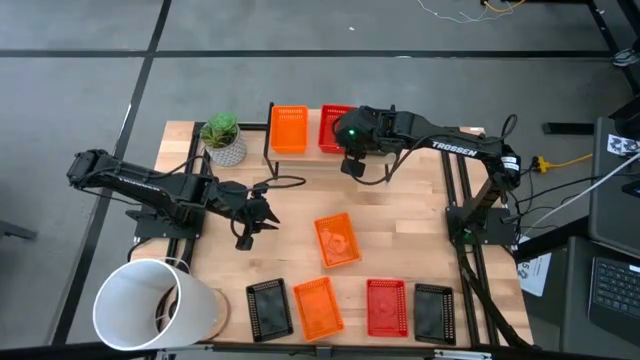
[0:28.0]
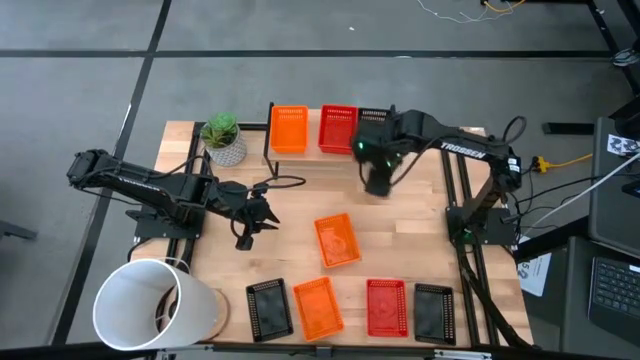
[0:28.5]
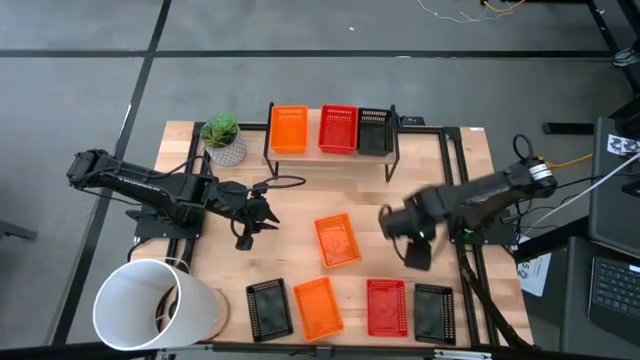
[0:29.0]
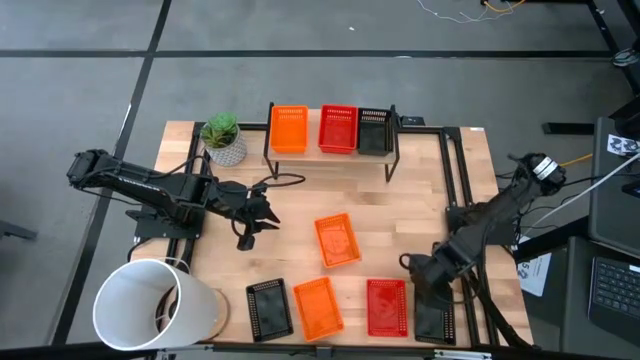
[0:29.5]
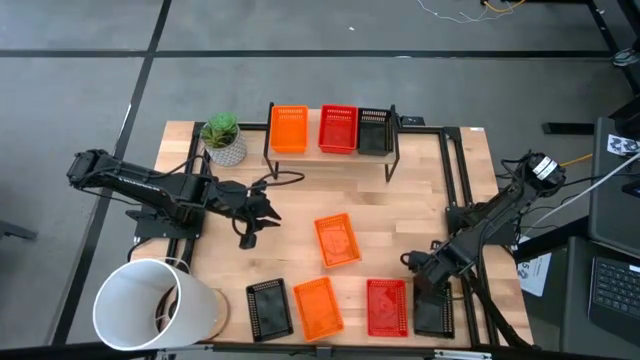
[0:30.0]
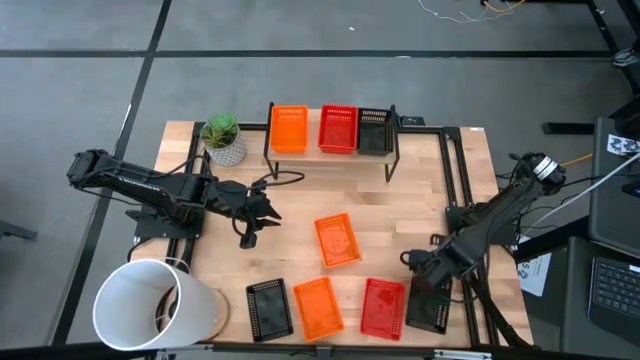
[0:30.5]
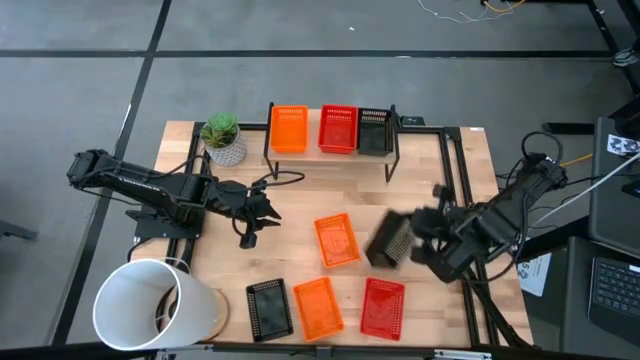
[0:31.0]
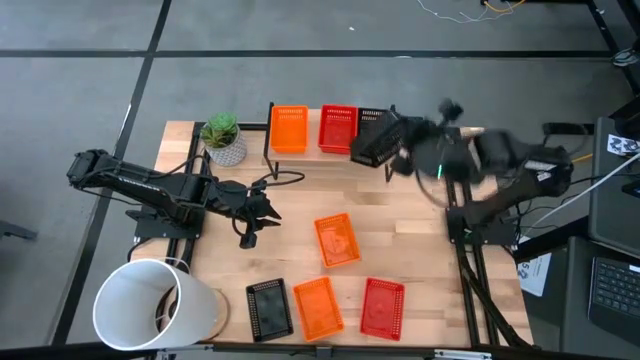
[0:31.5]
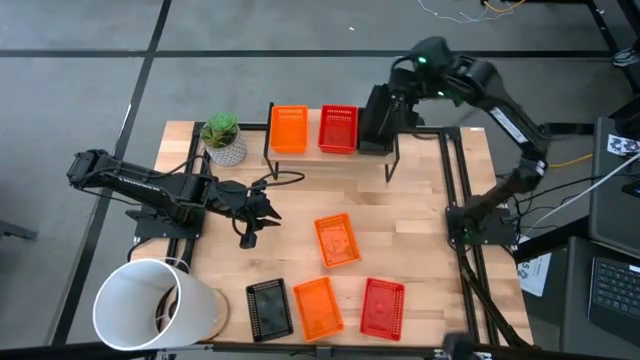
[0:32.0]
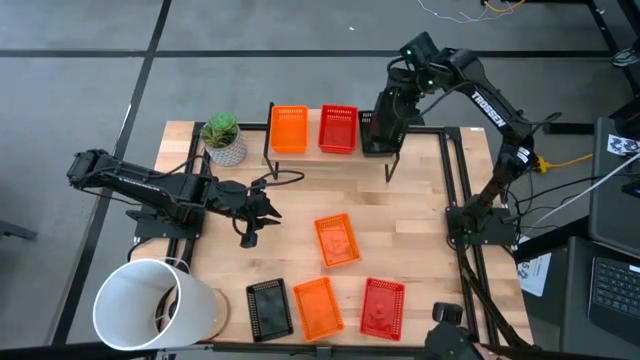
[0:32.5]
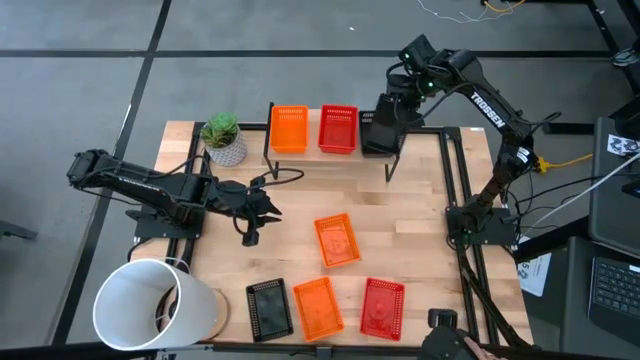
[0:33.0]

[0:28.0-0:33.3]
Task: Stack baskets on shelf by color
Stack the right black bin on top of the black bin on the shelf

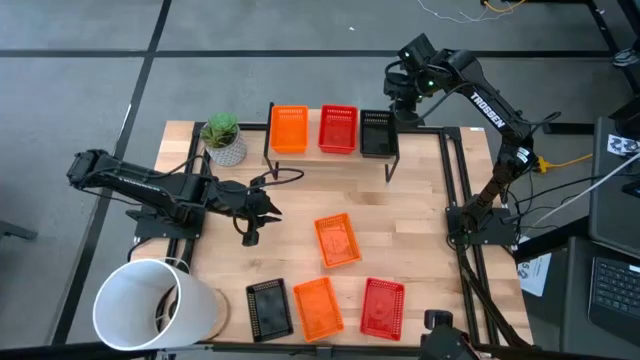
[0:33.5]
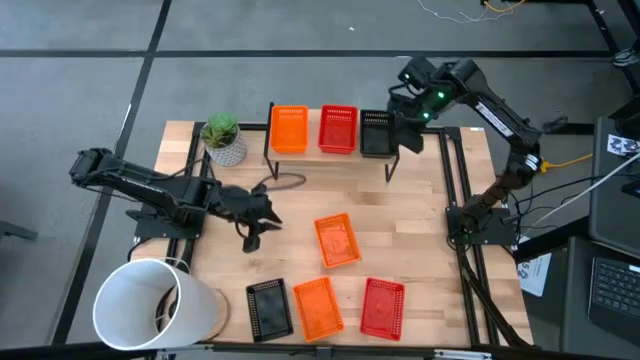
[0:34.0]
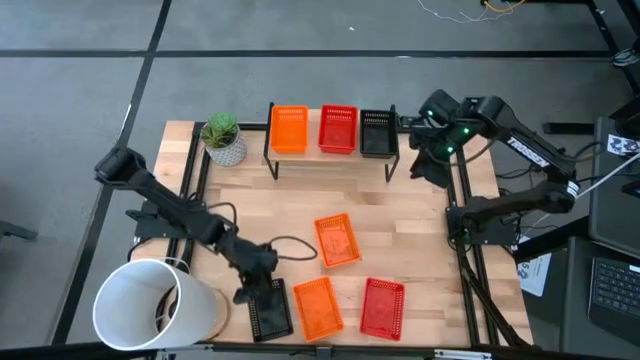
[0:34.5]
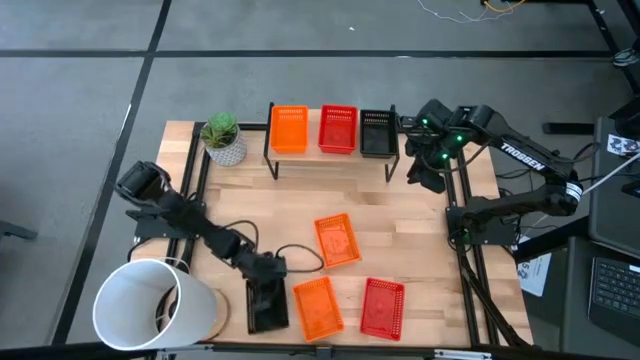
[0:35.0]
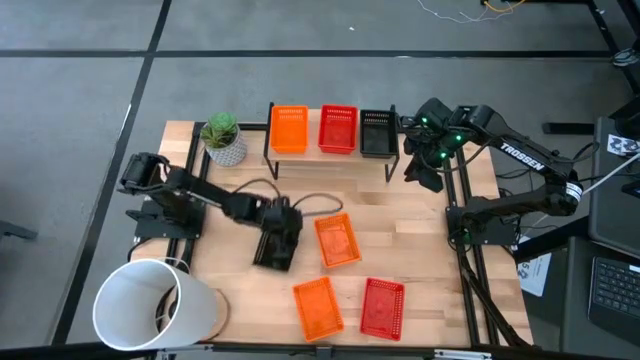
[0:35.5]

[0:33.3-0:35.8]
Move the black bin to the center of the table

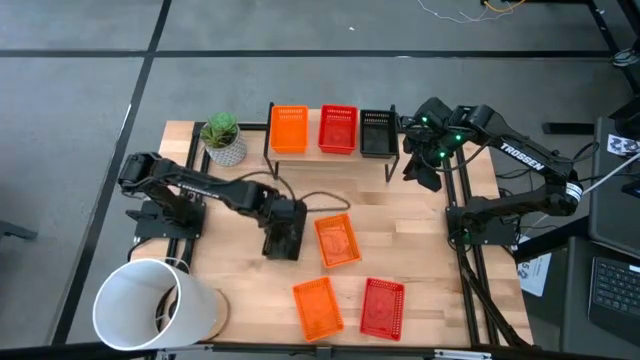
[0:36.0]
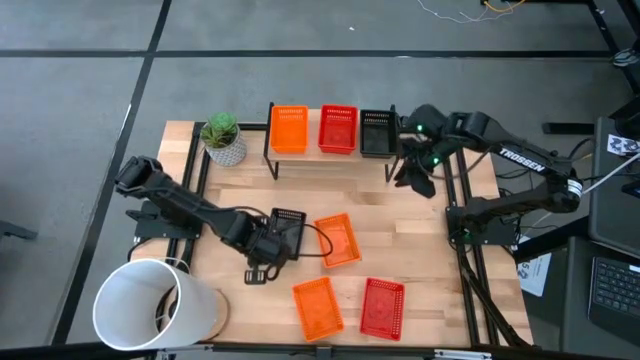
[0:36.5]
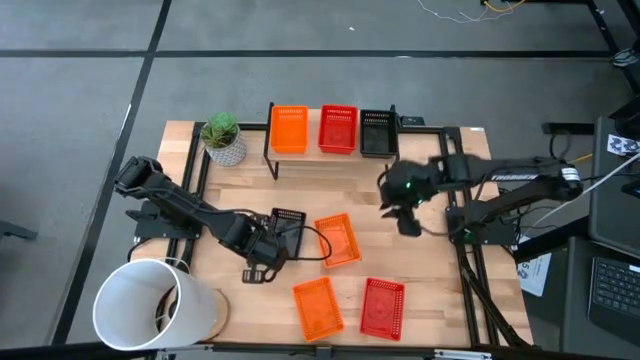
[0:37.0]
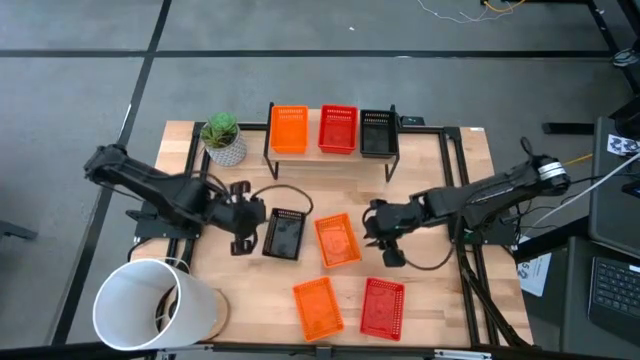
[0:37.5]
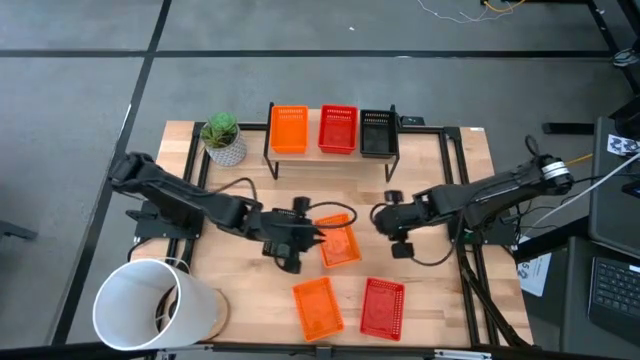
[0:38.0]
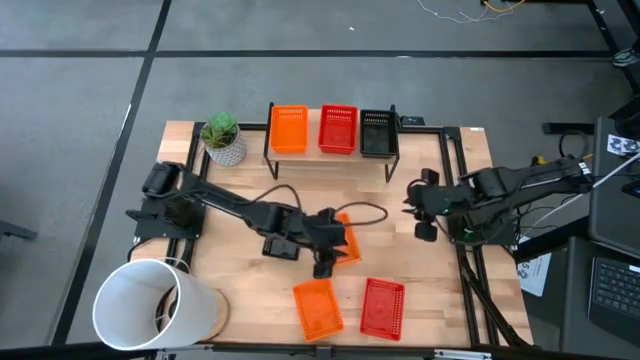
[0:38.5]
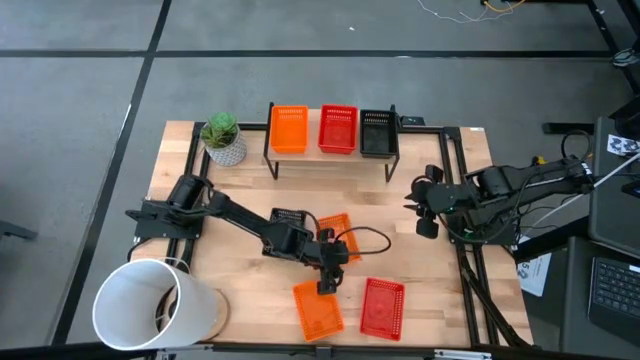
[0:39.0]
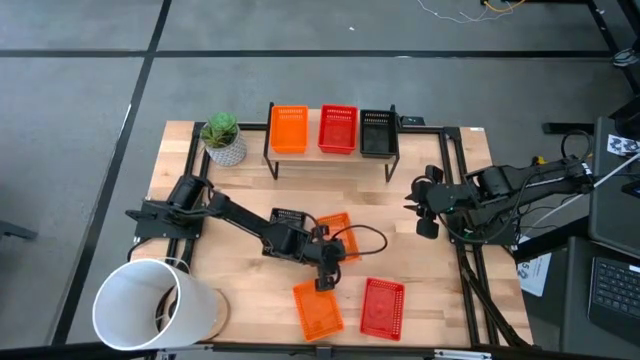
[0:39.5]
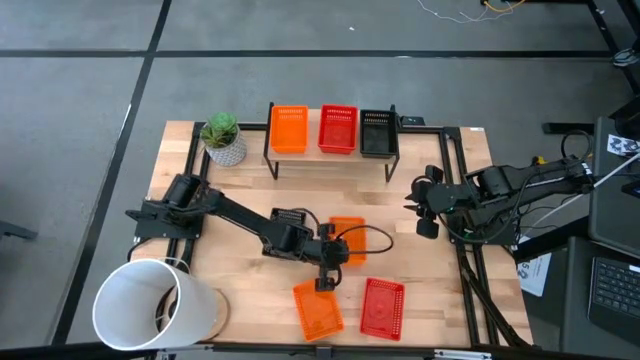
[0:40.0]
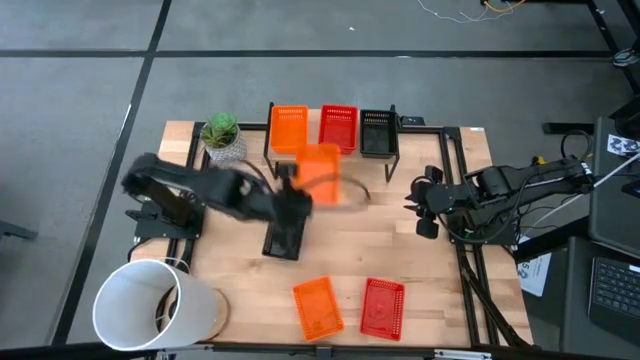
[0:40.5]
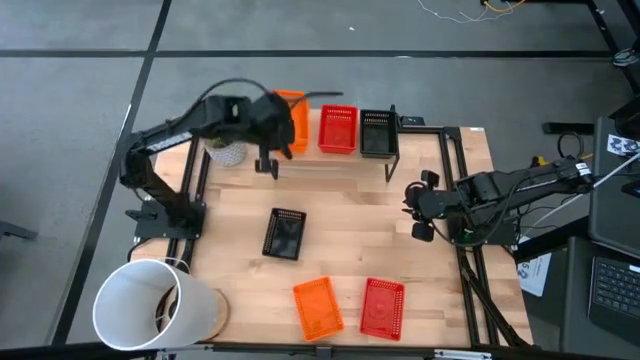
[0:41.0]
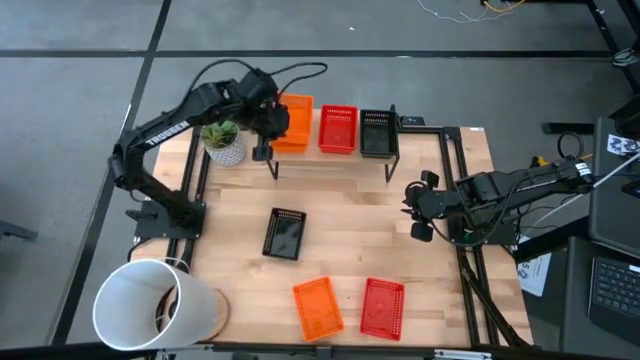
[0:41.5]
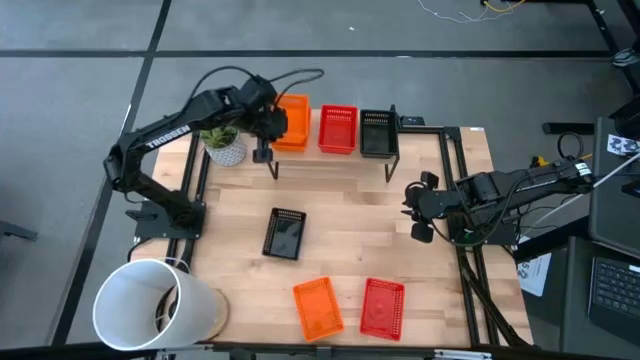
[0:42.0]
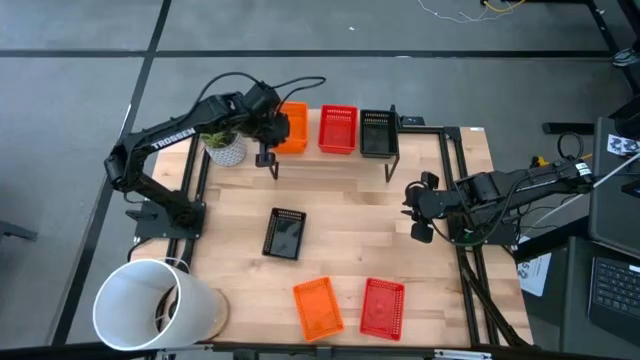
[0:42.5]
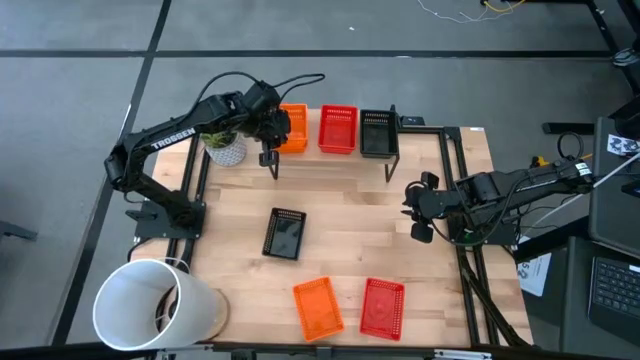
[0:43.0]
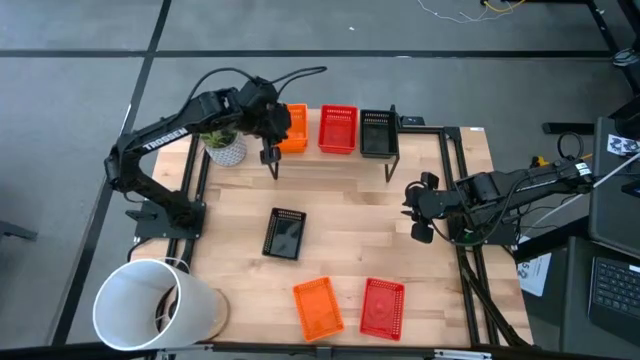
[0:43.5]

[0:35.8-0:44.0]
Stack the top orange bin on top of the orange bin on the shelf

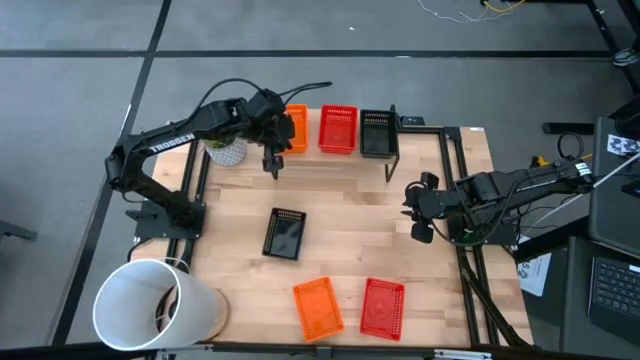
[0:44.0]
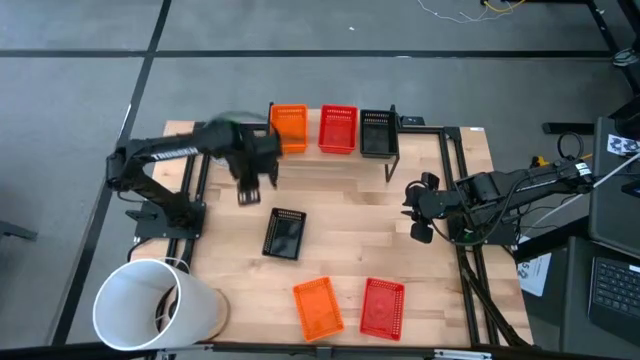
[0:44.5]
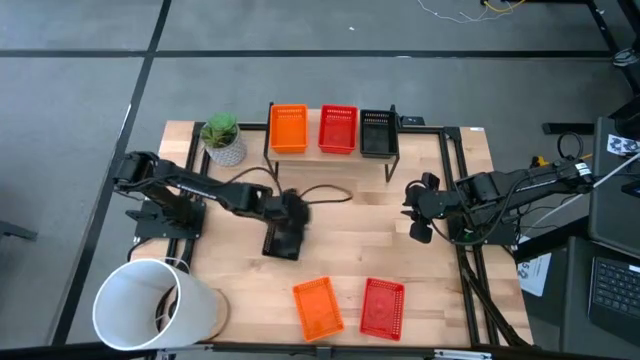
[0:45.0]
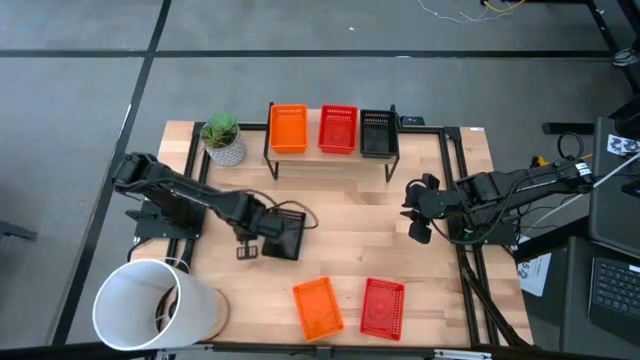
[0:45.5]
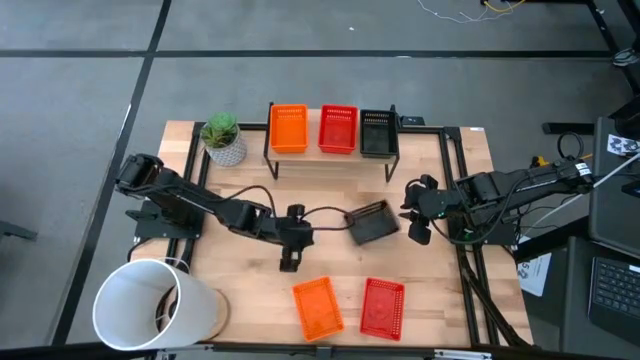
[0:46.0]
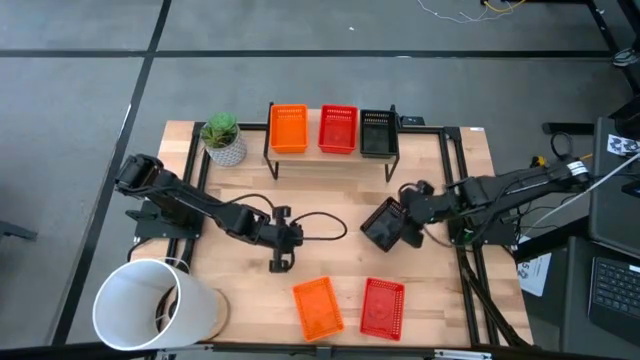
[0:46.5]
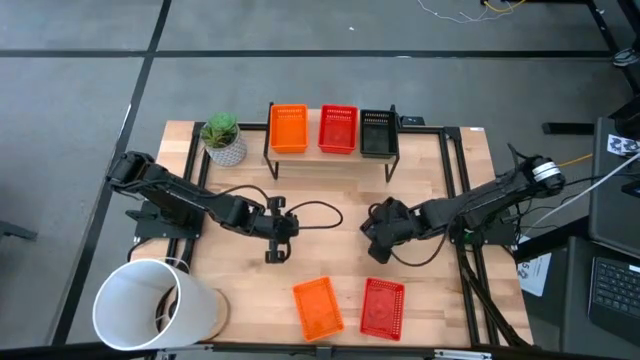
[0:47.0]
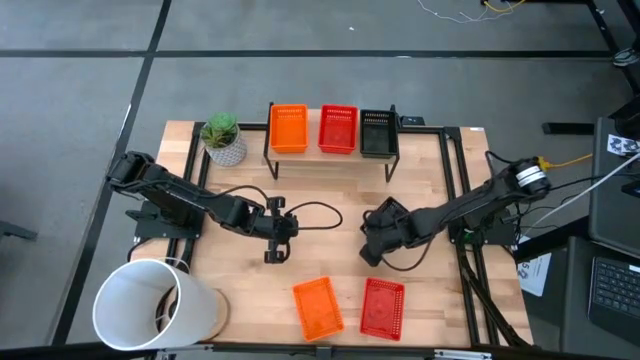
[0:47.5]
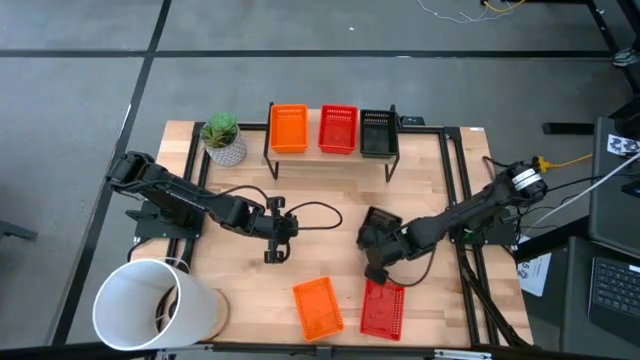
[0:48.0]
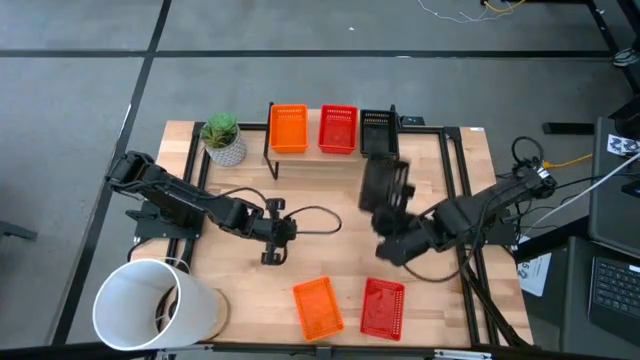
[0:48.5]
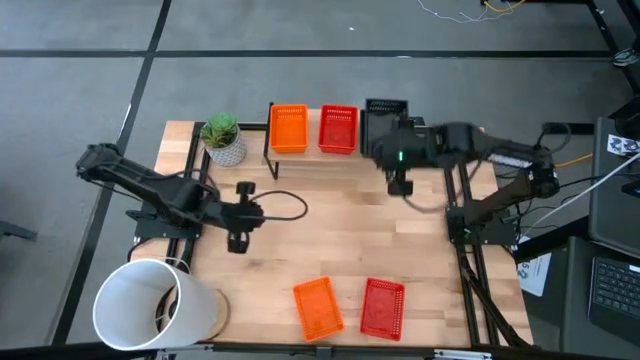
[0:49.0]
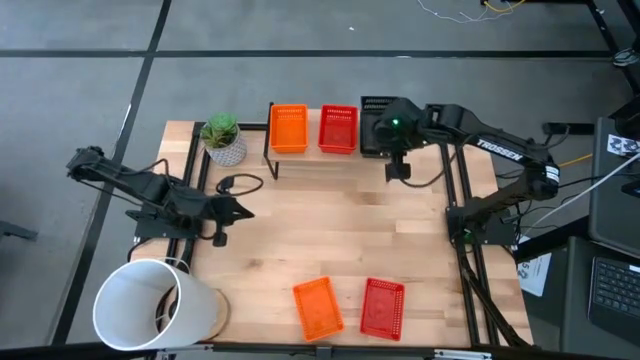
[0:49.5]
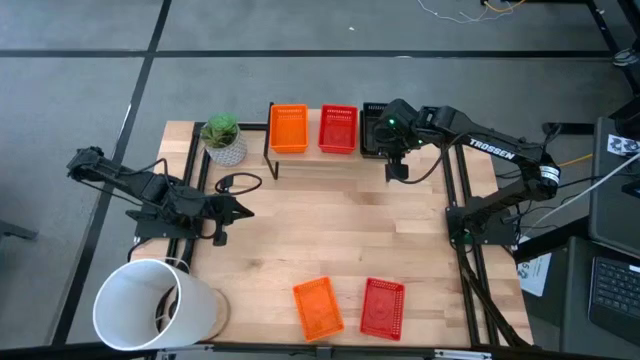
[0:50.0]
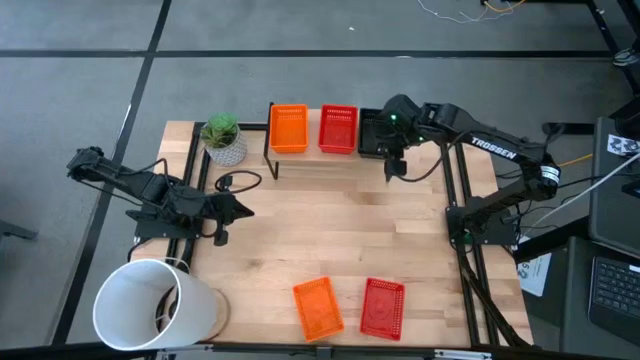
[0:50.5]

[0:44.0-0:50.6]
Stack the black bin on top of the black bins on the shelf
